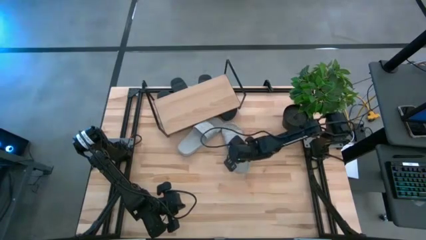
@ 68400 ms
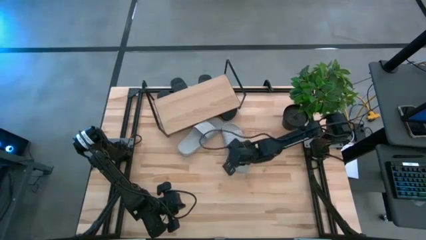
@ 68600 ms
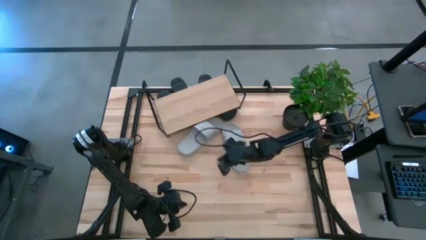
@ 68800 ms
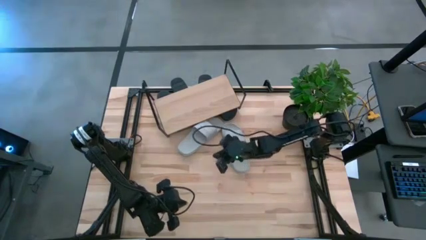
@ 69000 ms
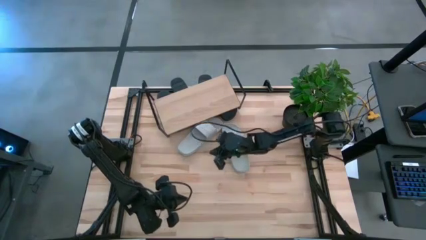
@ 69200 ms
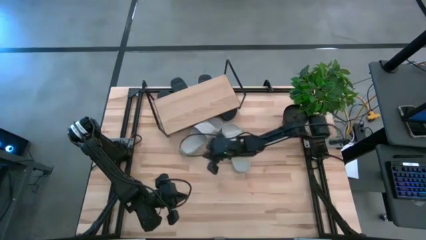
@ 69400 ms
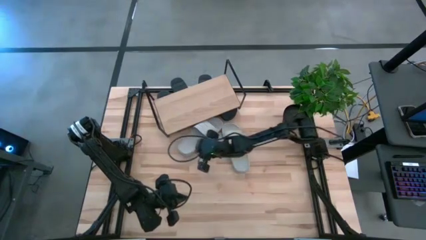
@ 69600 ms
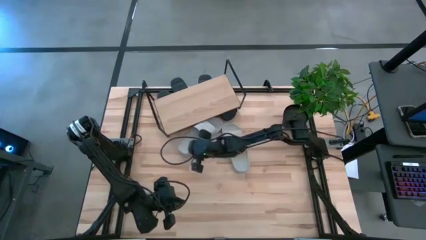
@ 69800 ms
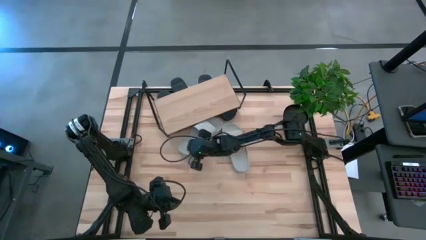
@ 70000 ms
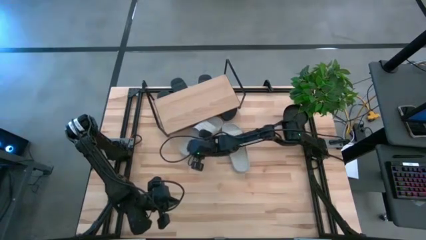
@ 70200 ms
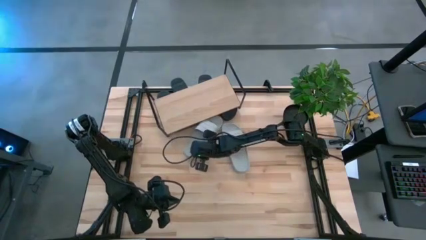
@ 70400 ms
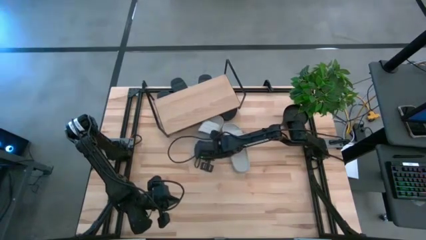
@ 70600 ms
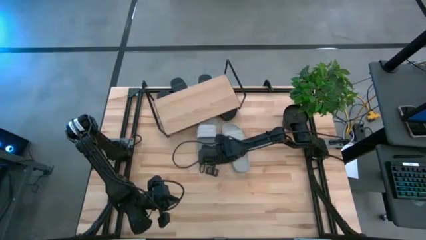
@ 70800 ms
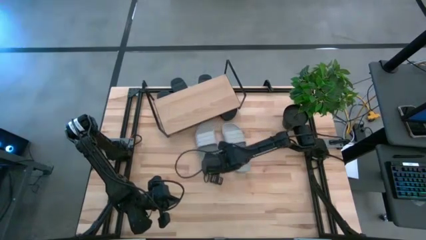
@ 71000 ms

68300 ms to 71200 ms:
Task: Pick and place slides into the shelf
Adjust the gray slipper

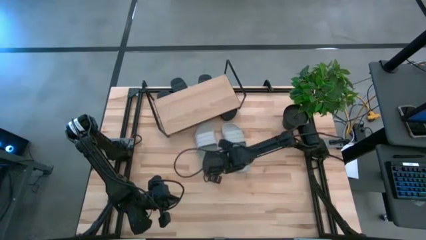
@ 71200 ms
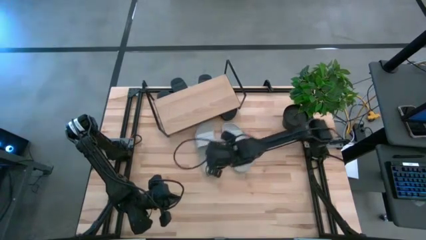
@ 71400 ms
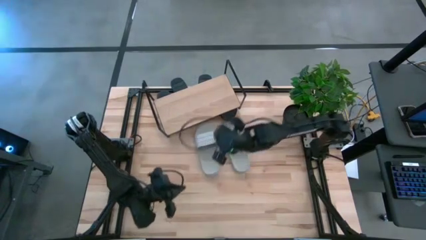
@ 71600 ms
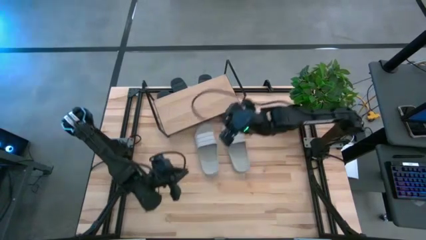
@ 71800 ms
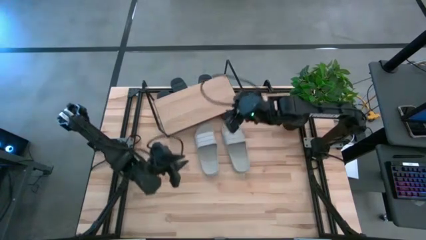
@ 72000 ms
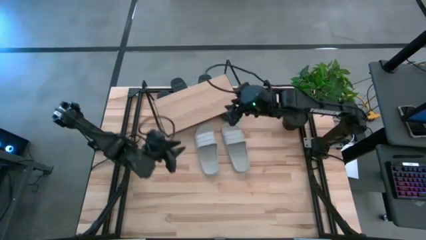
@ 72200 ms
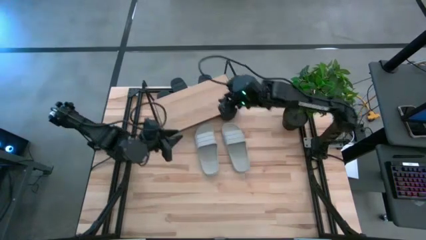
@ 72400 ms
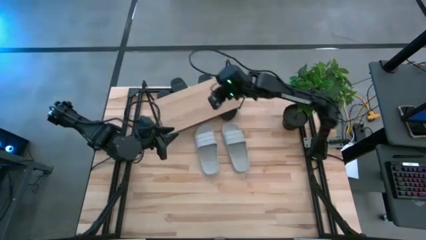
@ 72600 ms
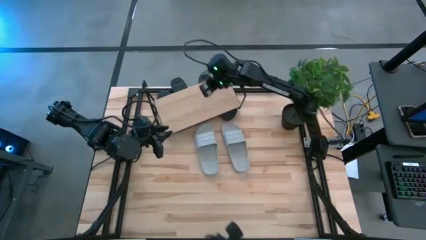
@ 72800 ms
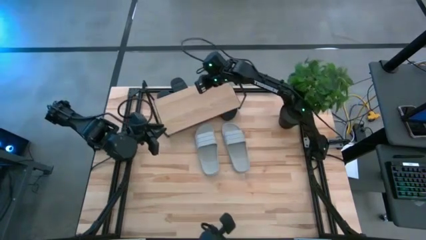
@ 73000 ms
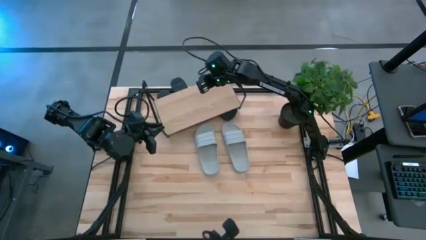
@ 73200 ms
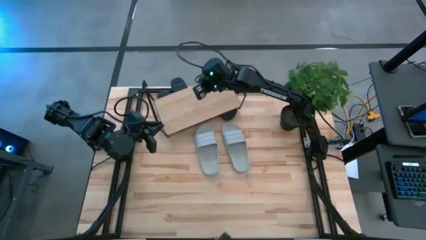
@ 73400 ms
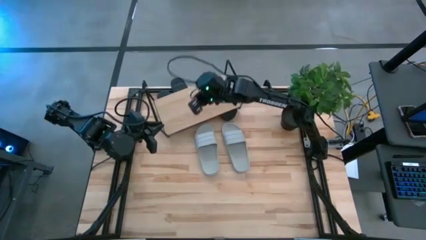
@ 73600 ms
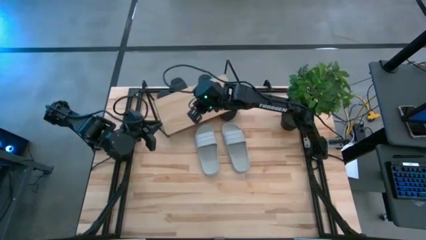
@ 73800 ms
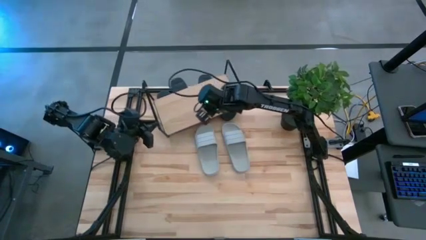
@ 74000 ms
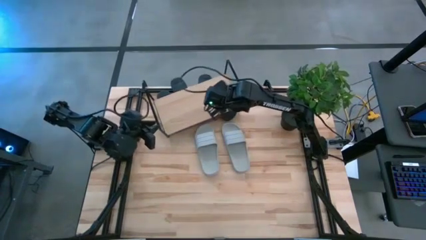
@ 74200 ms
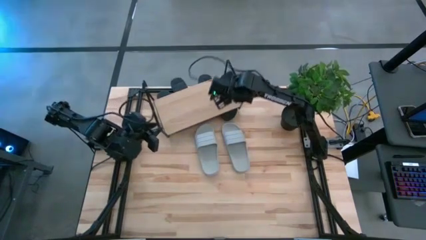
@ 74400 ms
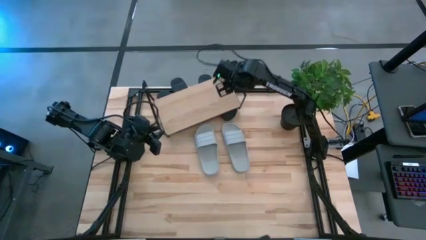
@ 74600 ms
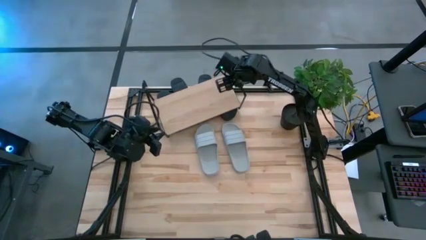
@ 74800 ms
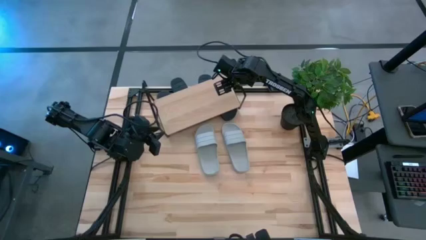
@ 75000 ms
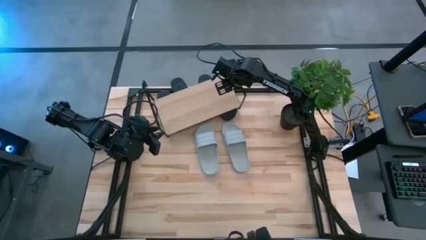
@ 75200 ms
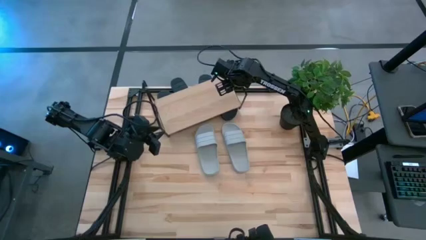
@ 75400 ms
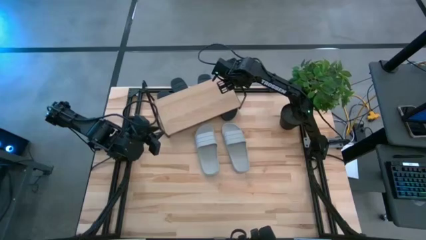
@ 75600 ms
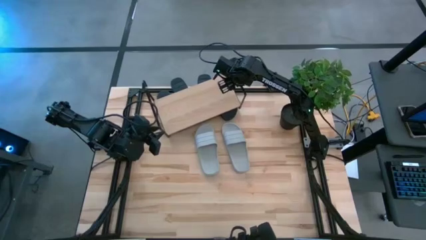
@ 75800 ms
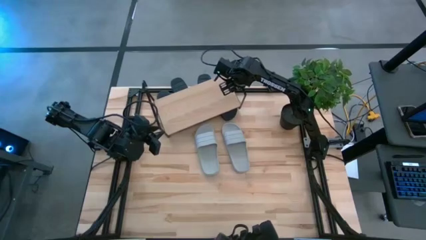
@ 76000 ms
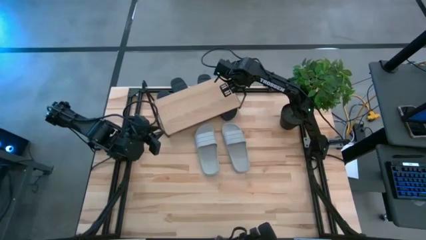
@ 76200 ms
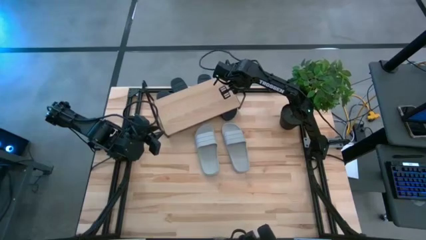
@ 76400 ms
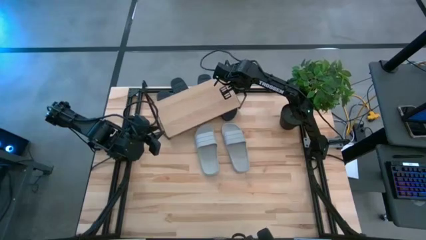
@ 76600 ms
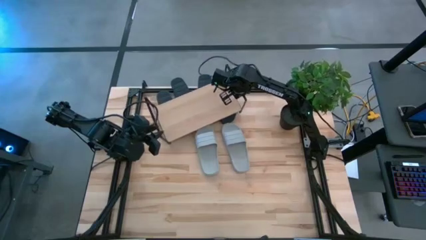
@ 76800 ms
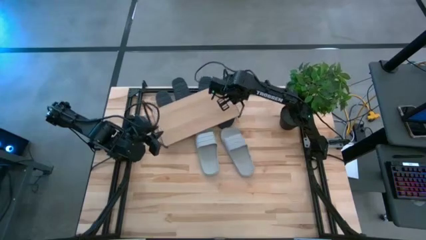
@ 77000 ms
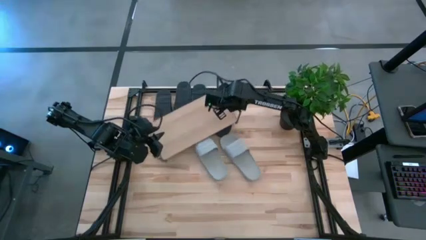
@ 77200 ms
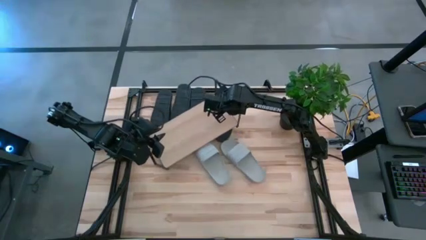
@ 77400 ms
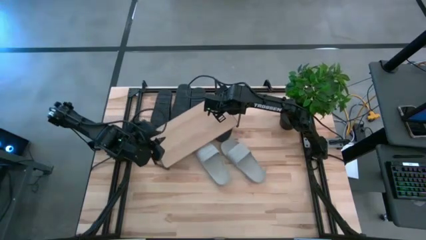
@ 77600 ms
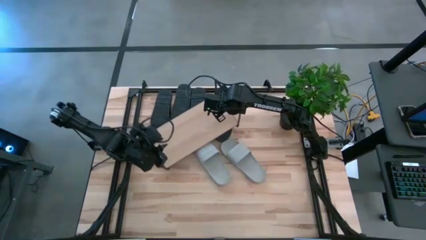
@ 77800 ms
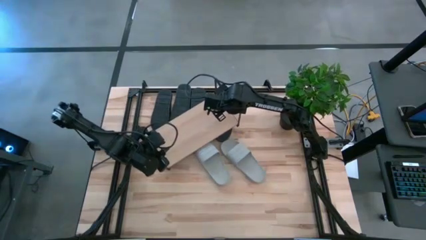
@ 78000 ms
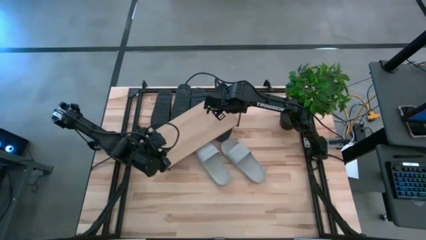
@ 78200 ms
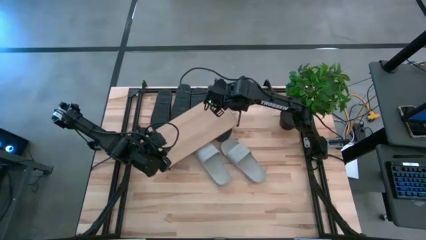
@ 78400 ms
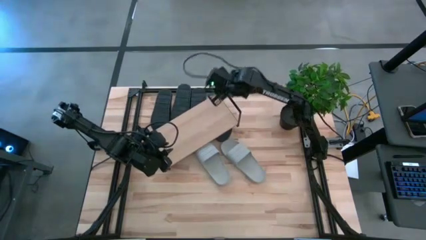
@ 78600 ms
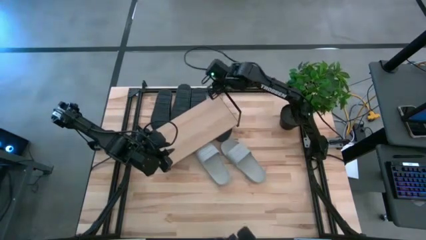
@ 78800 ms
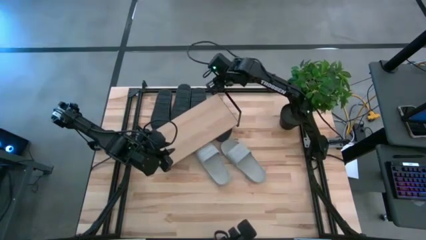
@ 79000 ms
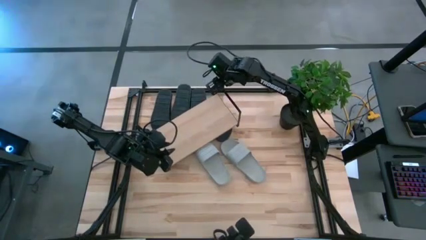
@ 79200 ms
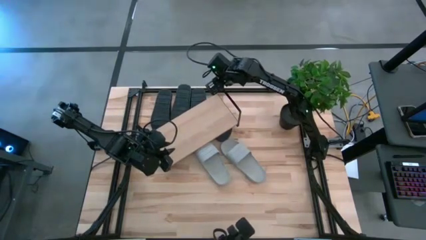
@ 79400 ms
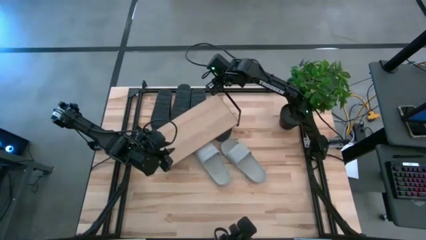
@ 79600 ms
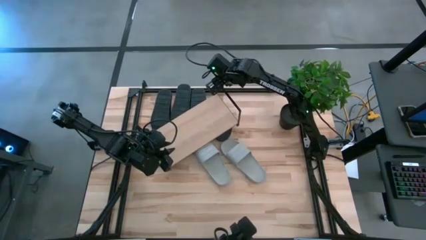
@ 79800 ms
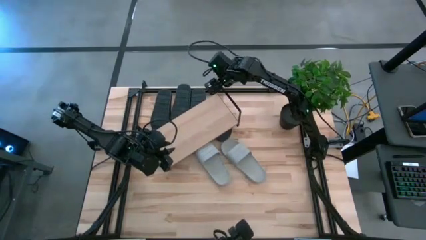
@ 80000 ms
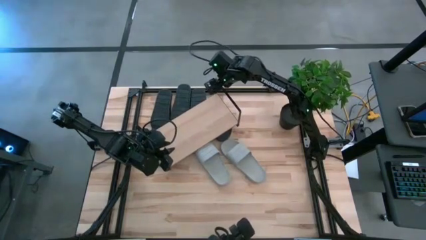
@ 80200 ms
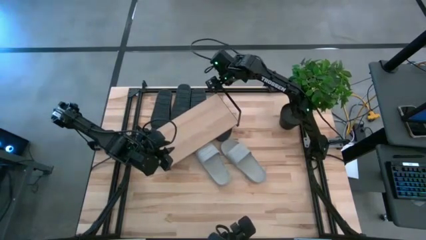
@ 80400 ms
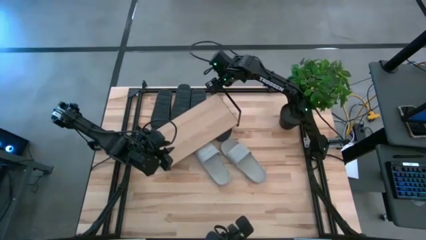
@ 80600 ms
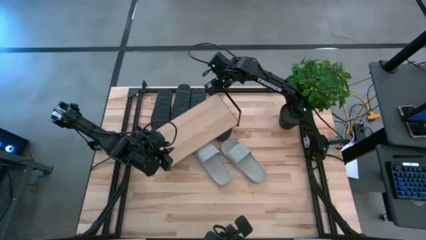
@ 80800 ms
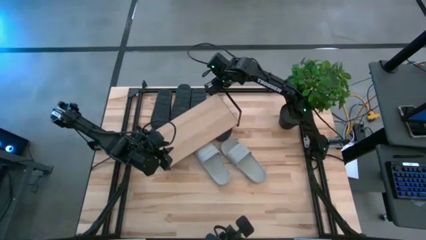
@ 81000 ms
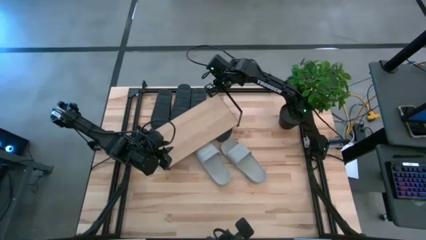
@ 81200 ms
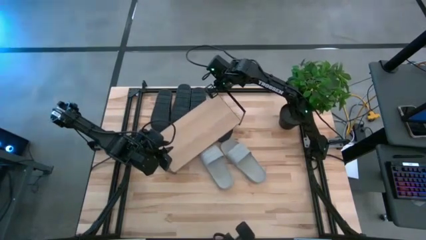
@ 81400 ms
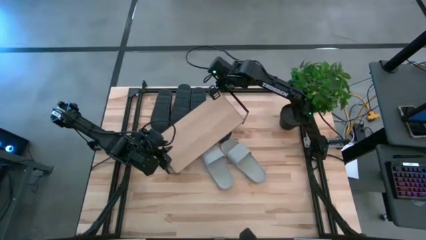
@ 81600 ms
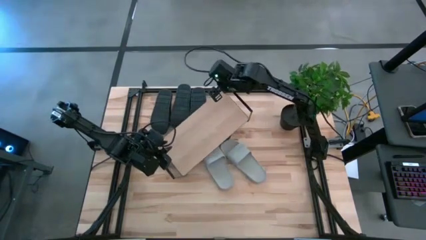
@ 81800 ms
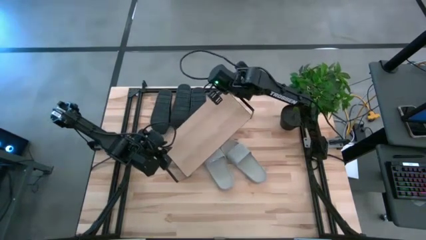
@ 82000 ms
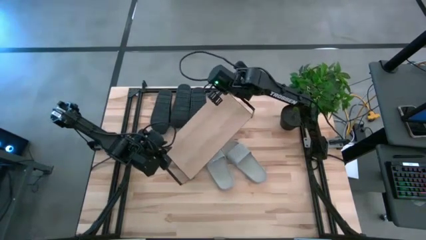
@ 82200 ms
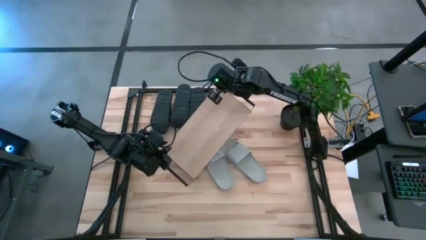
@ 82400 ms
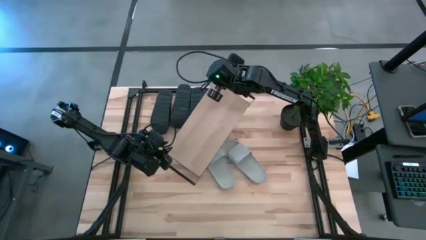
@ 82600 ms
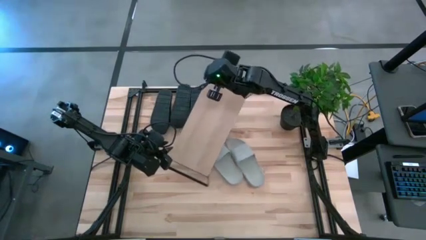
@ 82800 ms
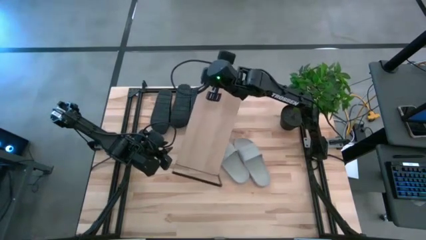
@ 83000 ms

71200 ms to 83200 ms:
Move the shelf to the bottom right of the table
